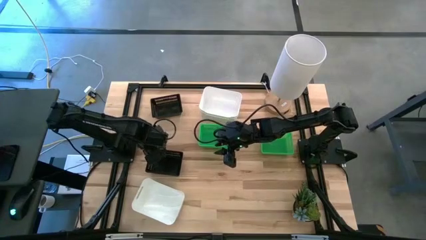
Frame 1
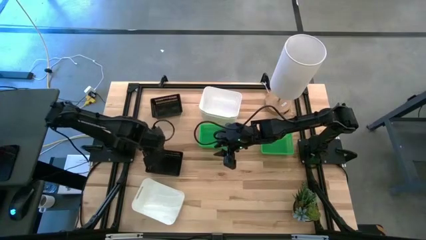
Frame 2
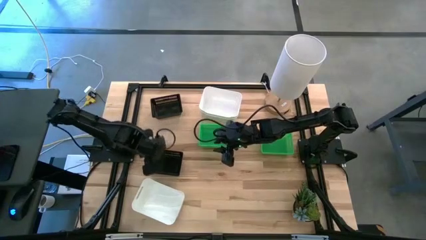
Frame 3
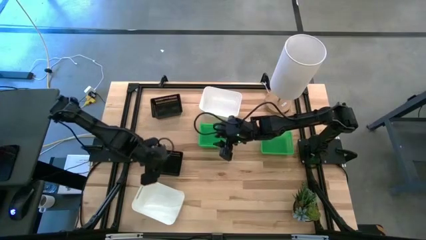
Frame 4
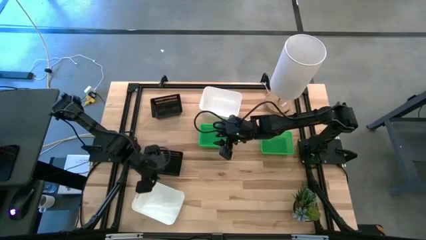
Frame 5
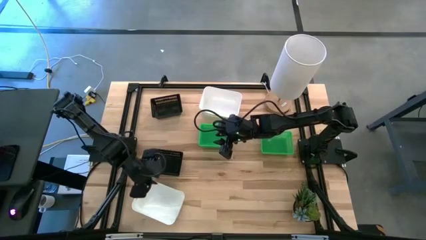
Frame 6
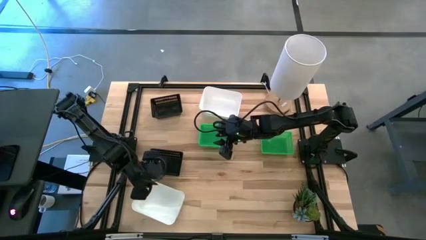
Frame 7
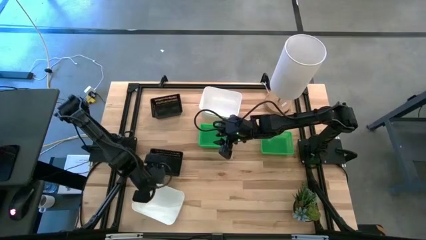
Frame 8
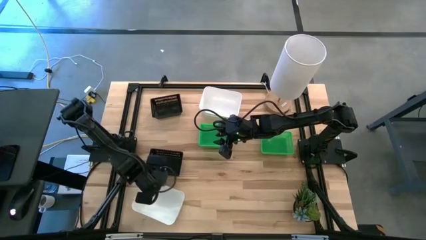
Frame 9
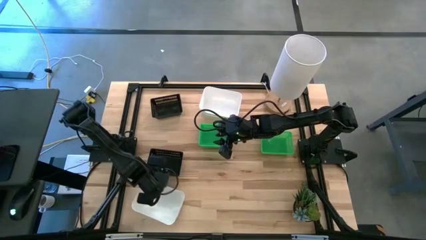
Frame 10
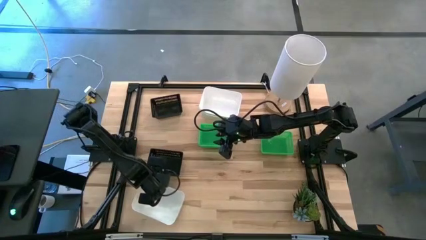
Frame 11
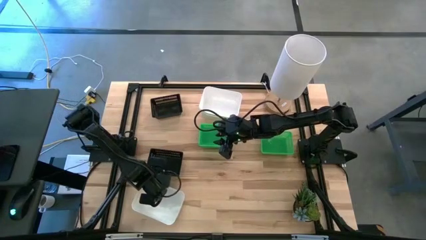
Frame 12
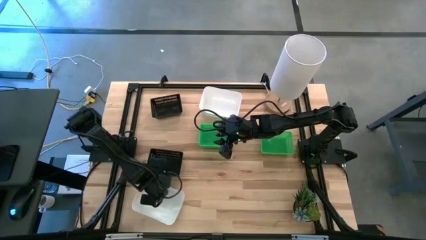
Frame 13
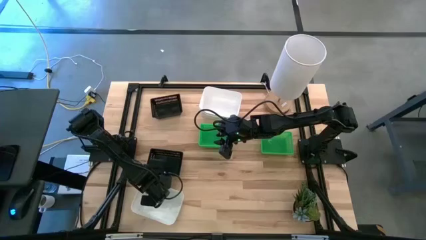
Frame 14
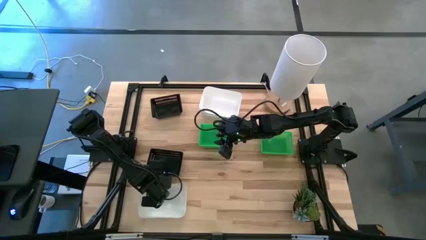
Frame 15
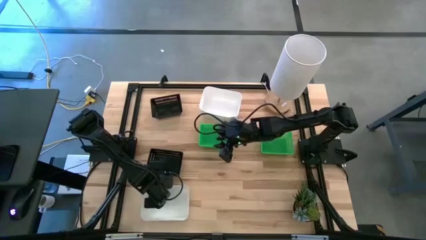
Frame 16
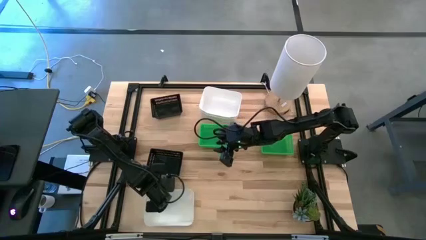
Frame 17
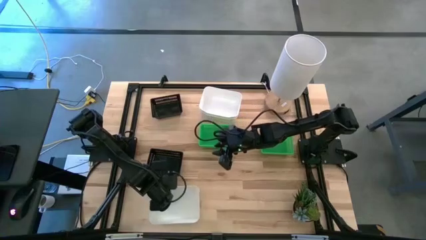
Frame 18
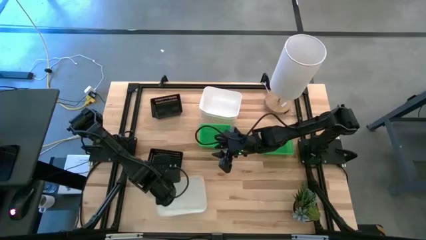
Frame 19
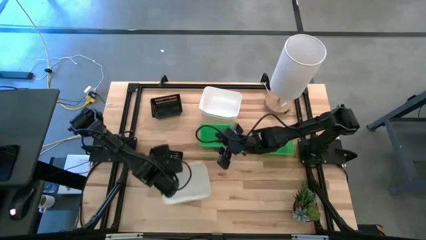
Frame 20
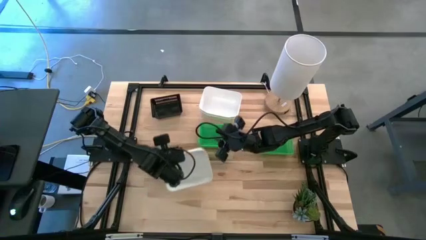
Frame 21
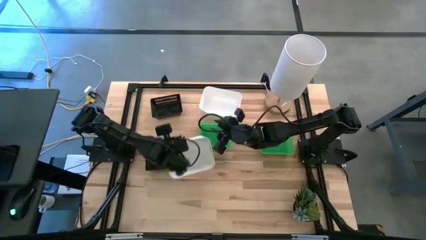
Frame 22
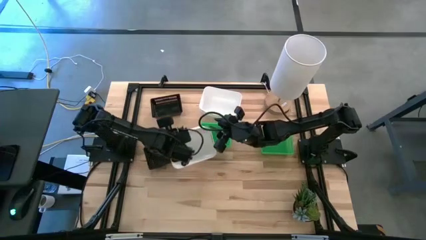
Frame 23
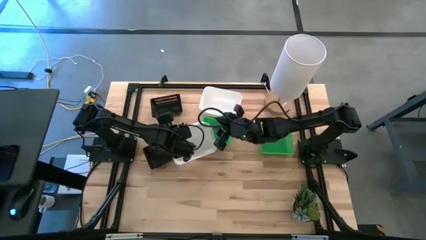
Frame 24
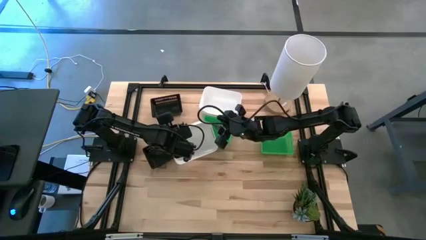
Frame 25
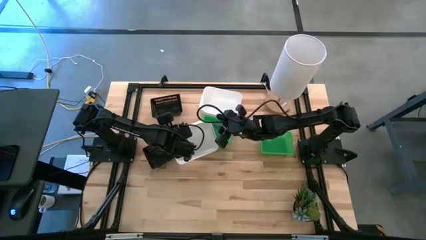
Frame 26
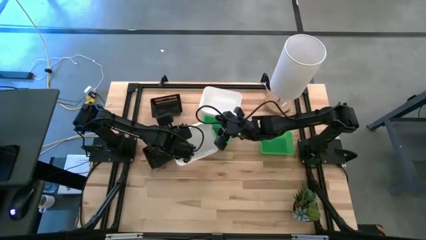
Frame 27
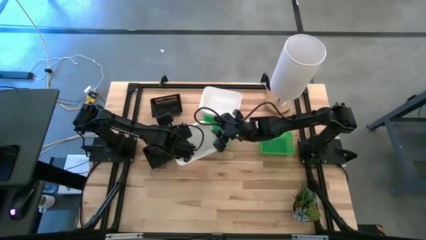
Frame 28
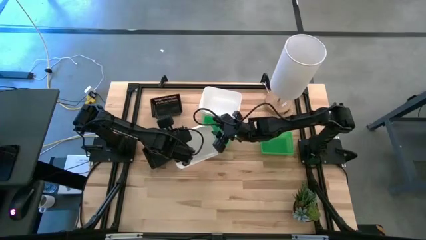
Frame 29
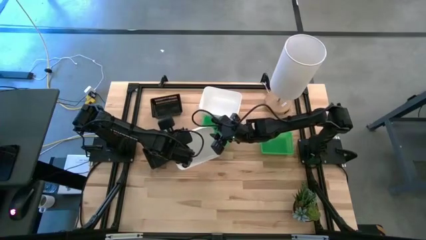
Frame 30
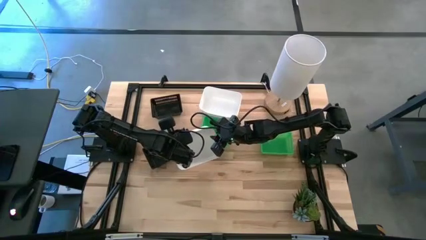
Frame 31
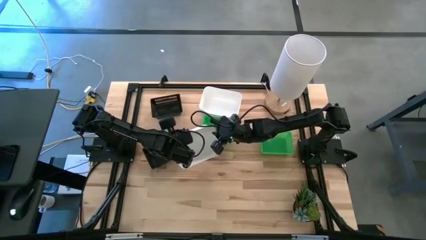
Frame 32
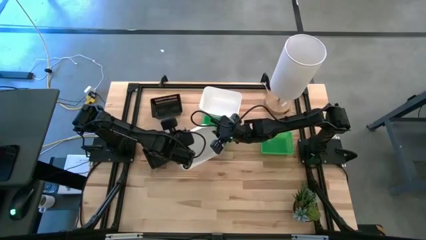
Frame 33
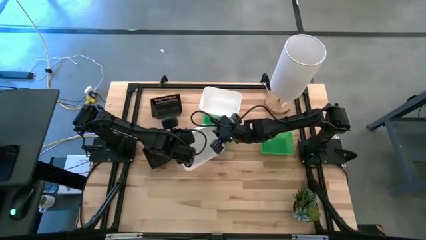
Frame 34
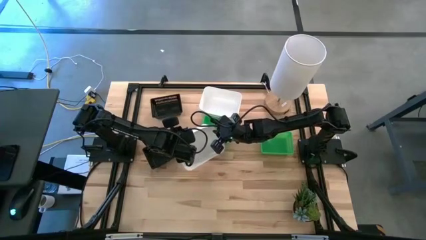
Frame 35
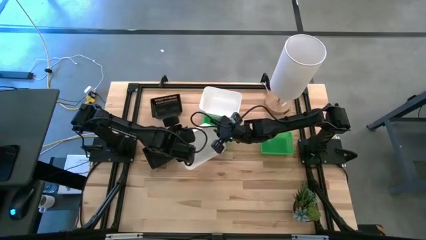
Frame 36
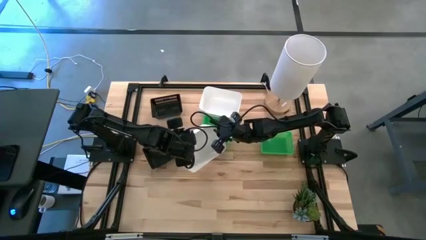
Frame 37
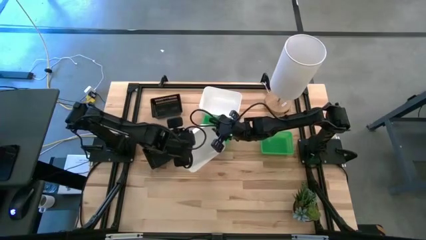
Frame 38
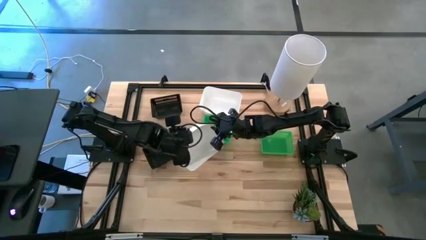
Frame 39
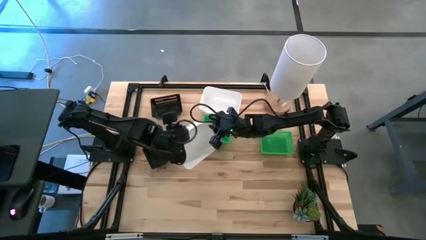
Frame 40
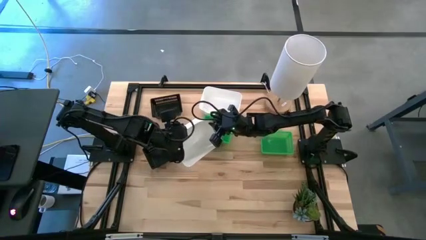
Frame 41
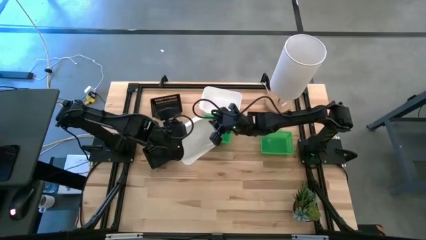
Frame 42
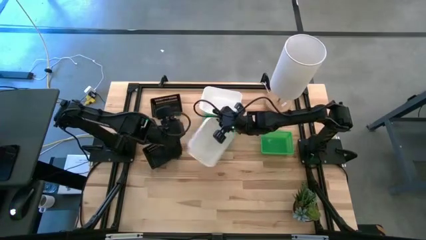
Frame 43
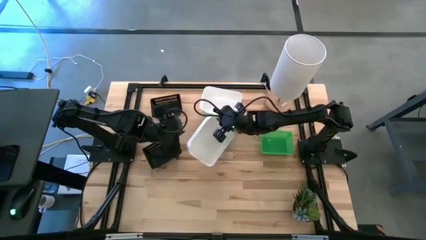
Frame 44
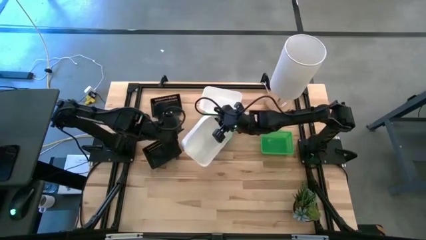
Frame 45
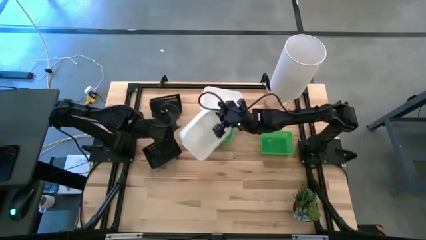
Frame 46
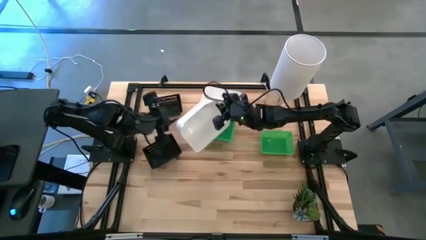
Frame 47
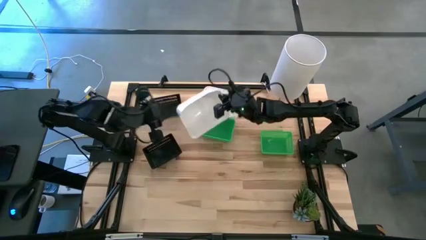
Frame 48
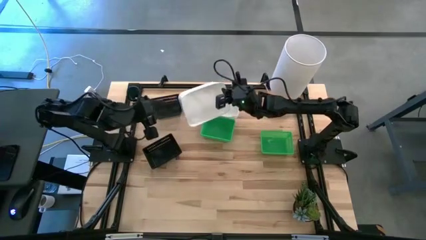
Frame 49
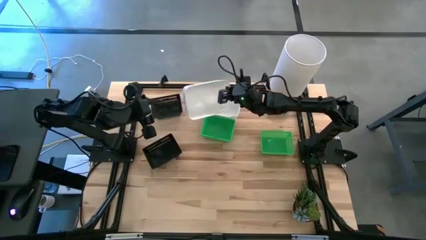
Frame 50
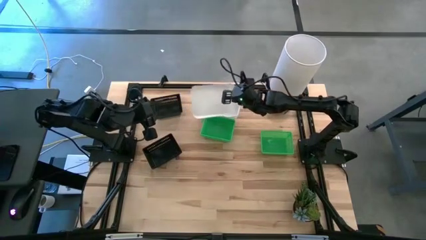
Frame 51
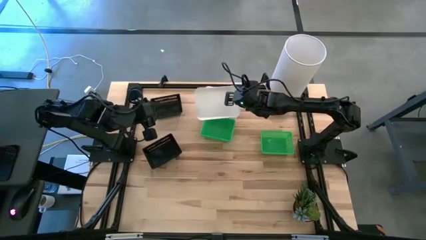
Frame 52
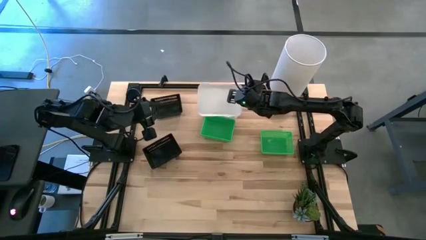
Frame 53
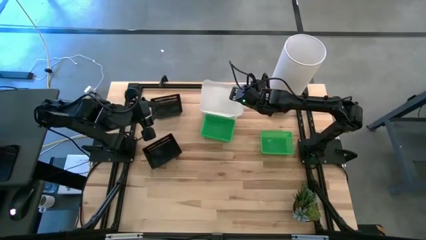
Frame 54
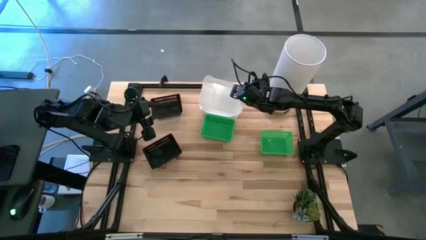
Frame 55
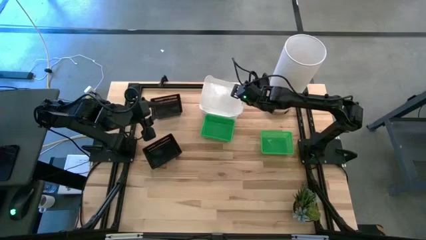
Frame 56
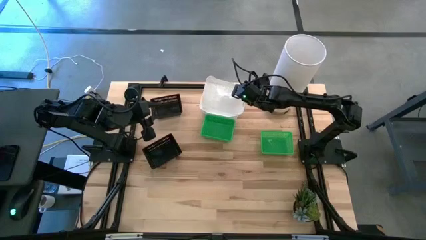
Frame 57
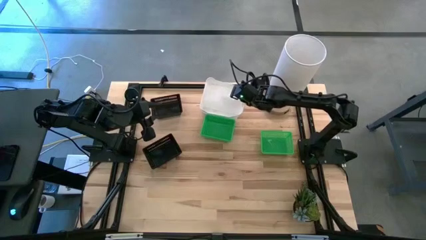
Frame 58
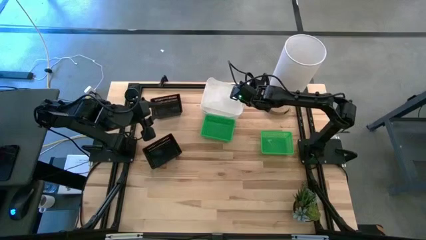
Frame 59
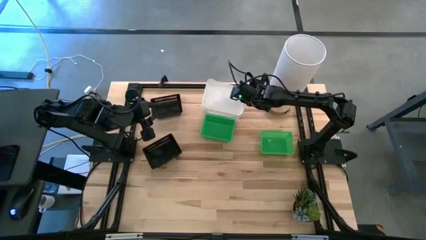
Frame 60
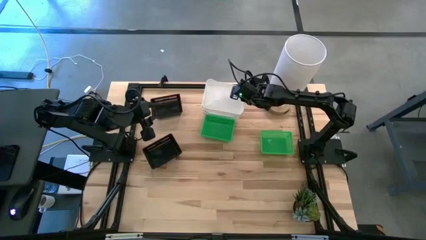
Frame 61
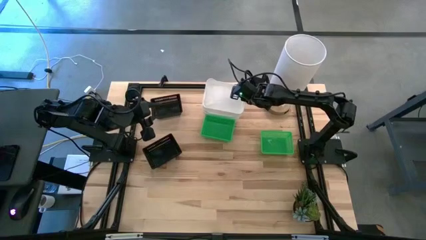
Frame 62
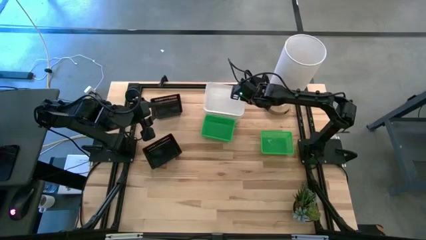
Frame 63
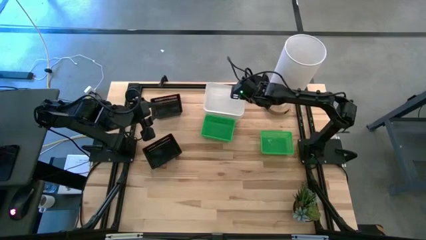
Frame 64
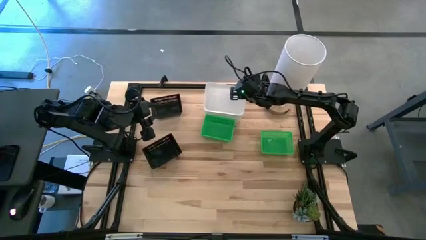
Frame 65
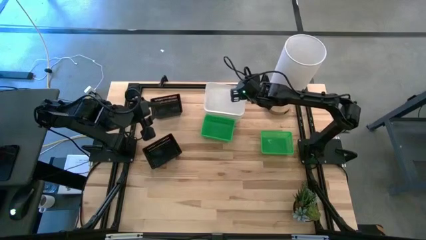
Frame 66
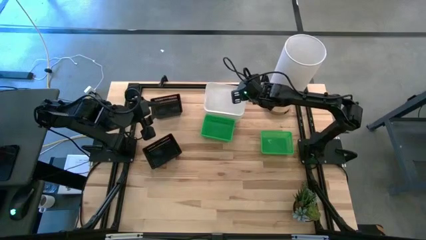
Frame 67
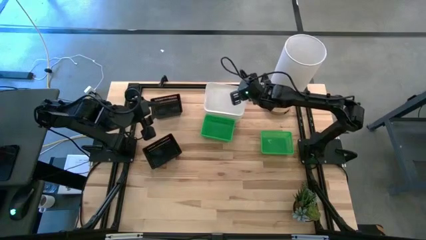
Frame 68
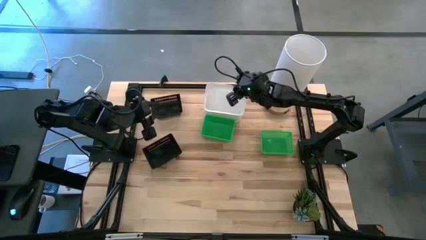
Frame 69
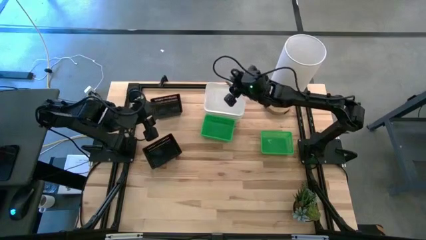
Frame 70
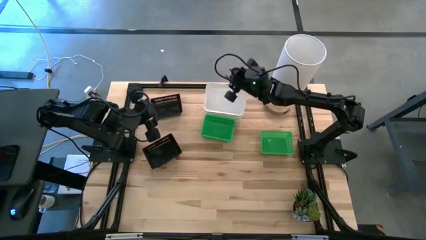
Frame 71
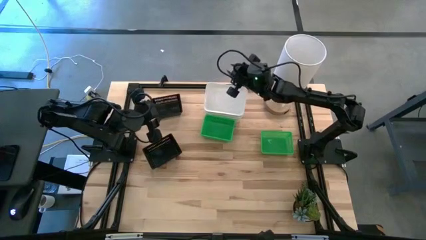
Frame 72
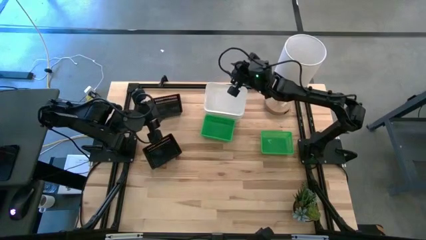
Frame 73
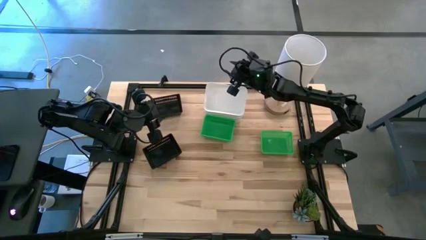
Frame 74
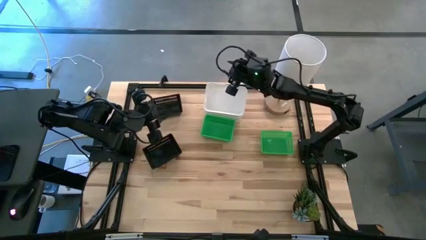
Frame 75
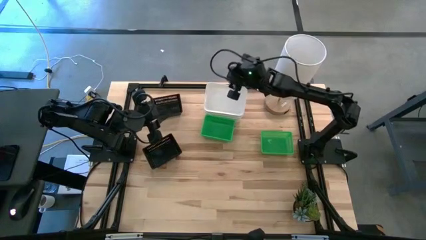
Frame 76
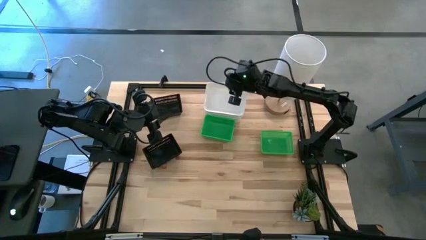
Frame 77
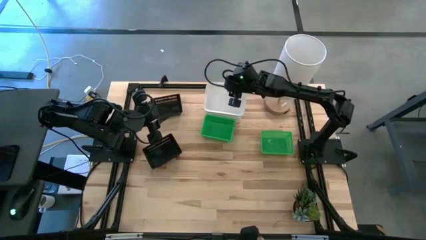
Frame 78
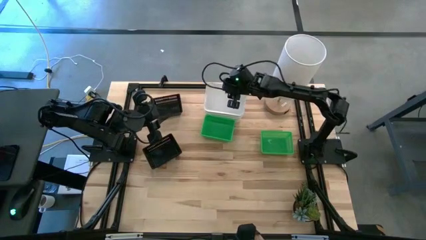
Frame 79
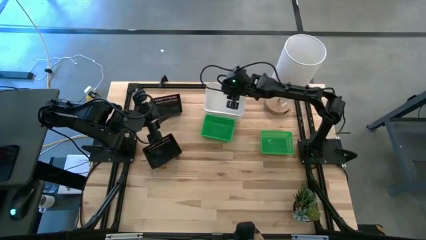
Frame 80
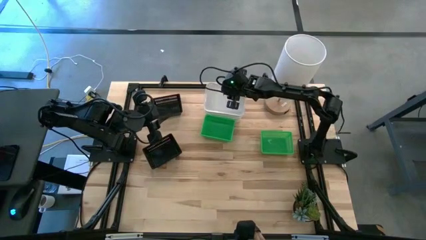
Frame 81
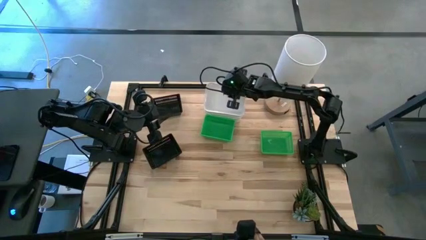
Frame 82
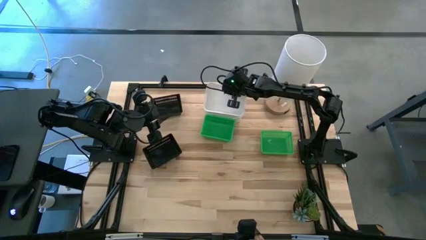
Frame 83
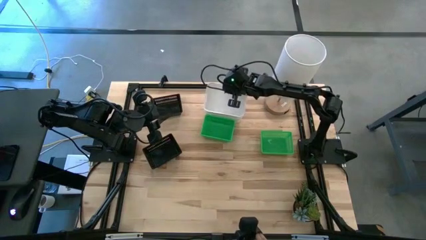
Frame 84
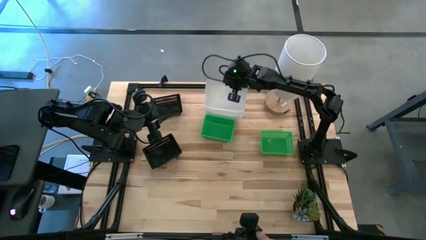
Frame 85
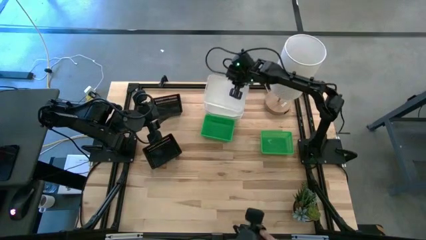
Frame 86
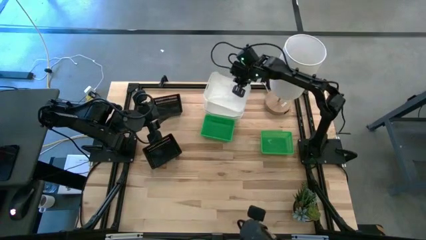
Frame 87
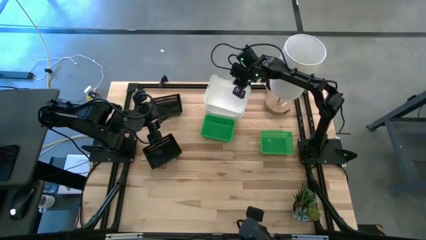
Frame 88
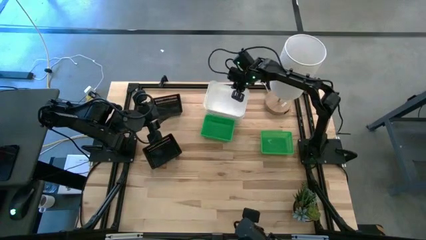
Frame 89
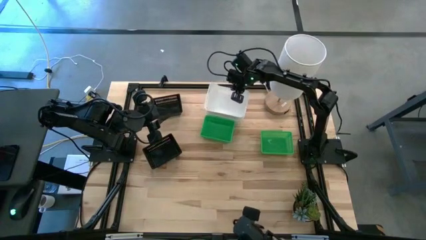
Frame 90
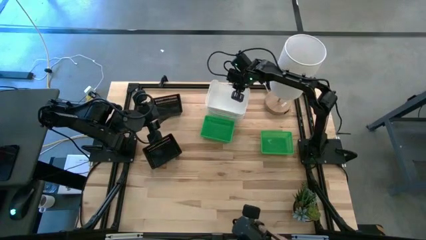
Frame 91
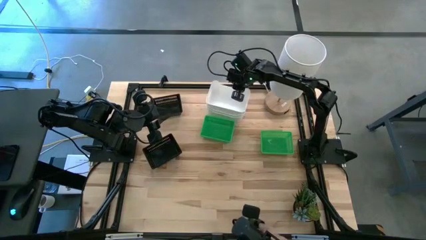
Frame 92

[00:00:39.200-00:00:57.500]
Stack the bottom white bin on the white bins
